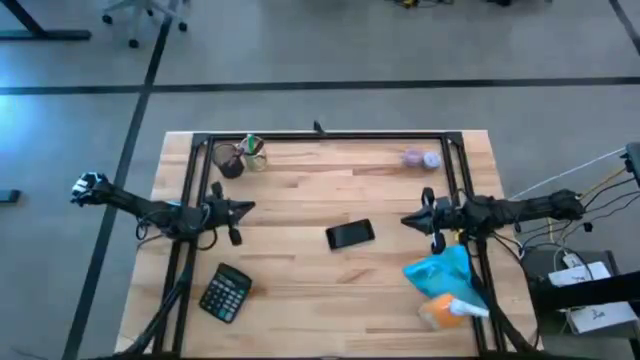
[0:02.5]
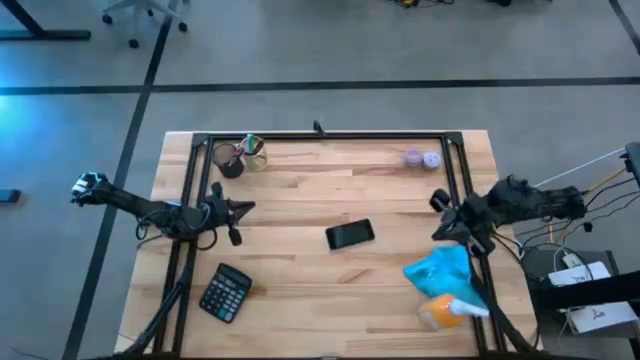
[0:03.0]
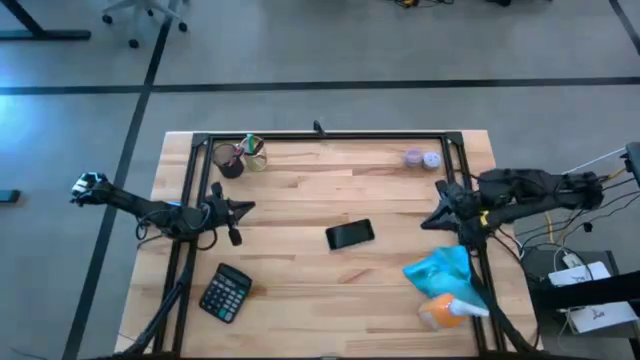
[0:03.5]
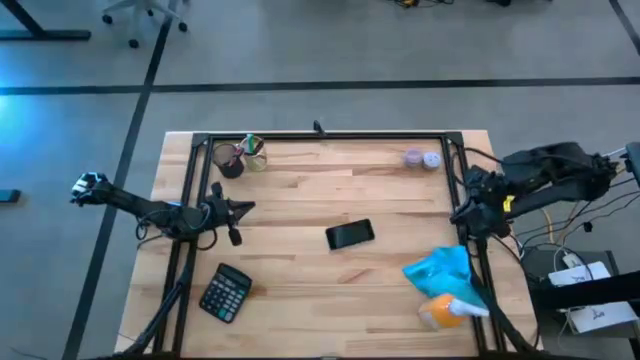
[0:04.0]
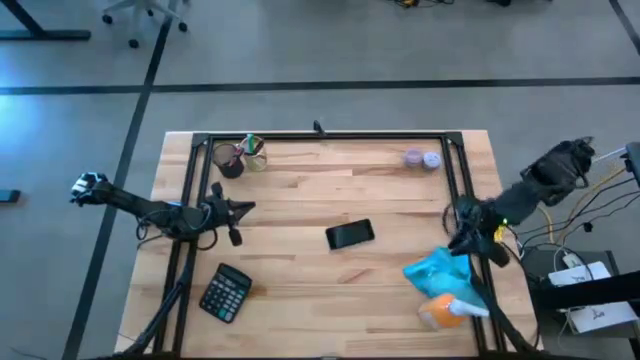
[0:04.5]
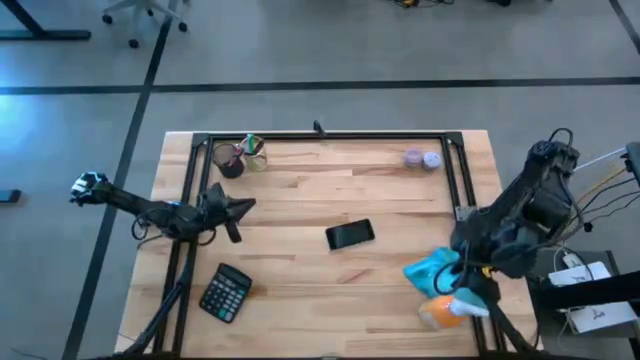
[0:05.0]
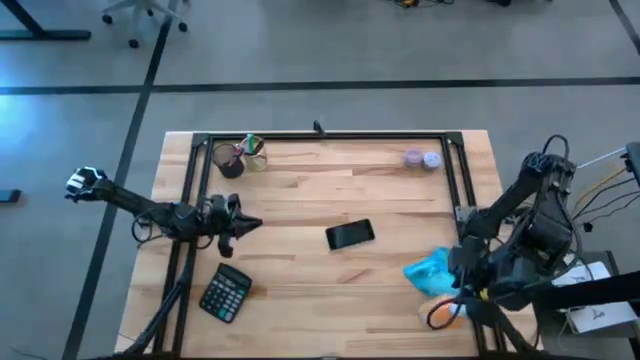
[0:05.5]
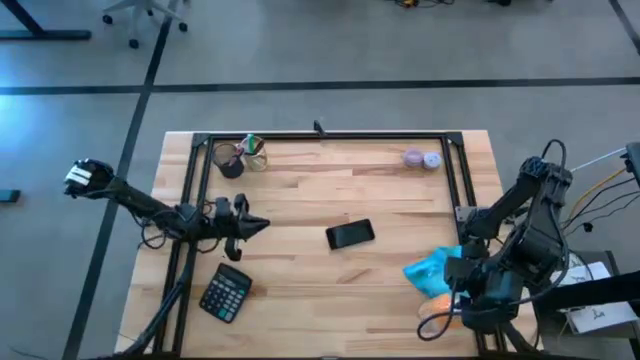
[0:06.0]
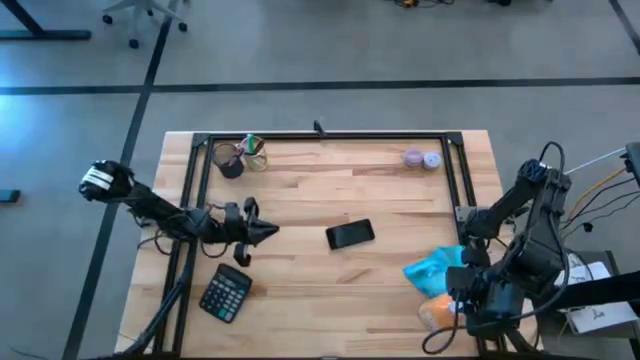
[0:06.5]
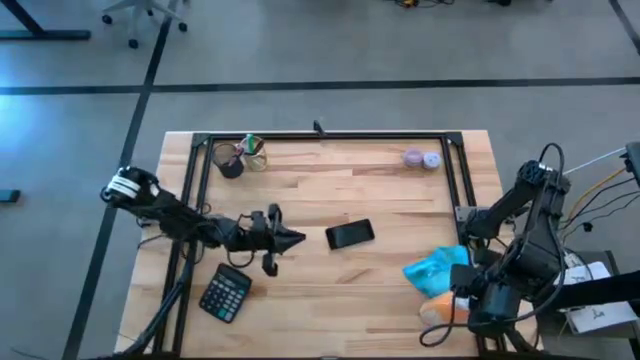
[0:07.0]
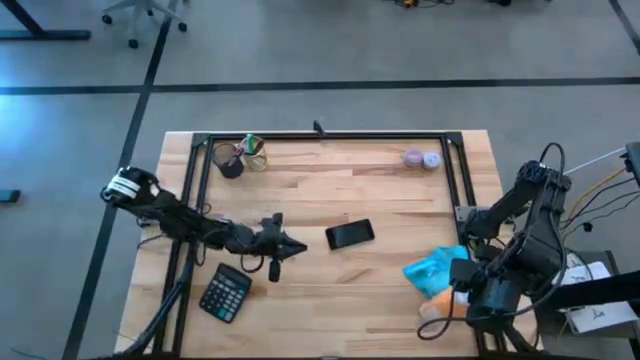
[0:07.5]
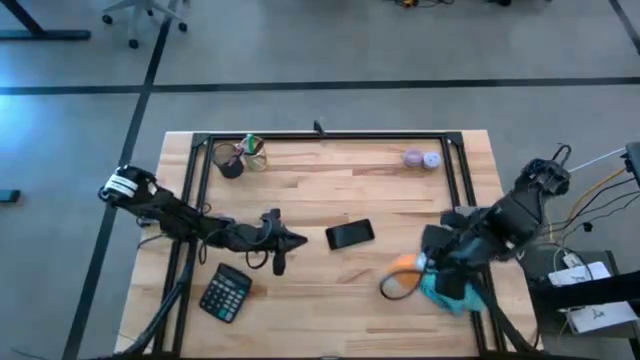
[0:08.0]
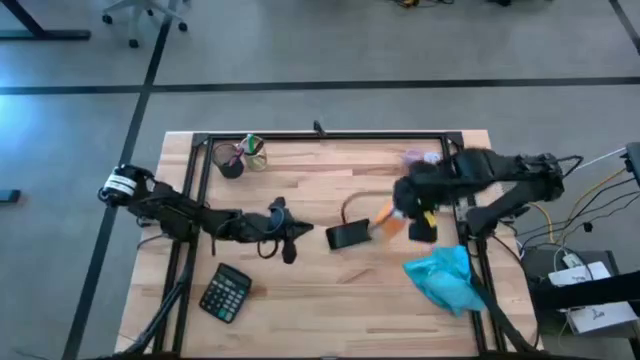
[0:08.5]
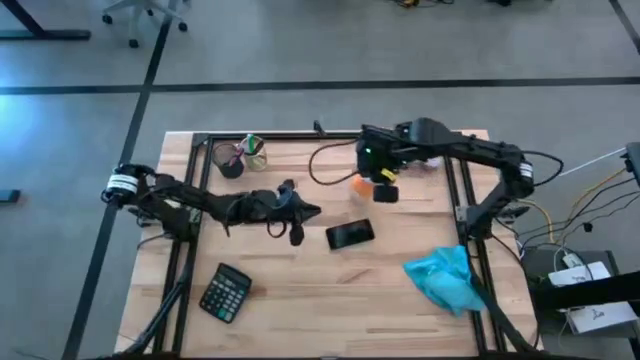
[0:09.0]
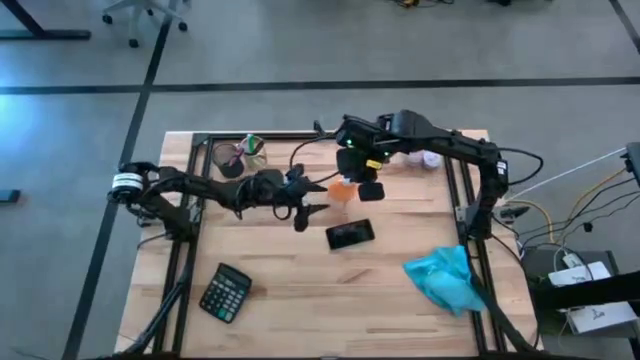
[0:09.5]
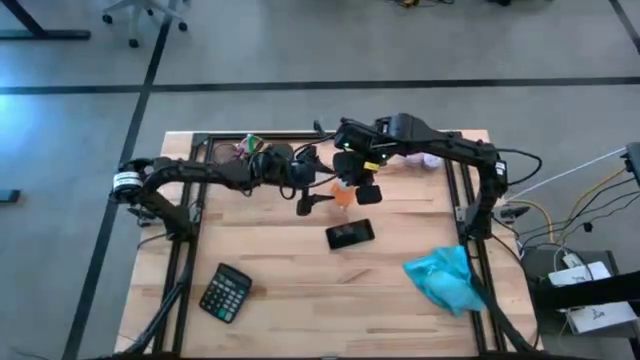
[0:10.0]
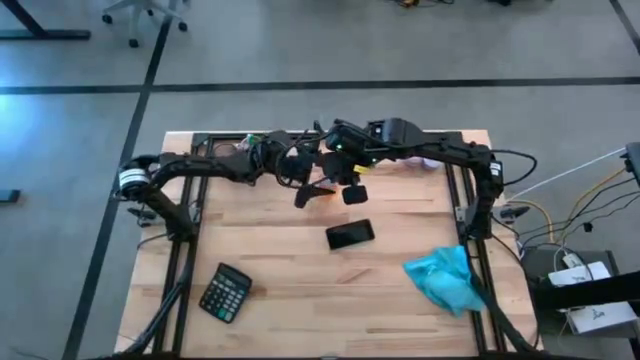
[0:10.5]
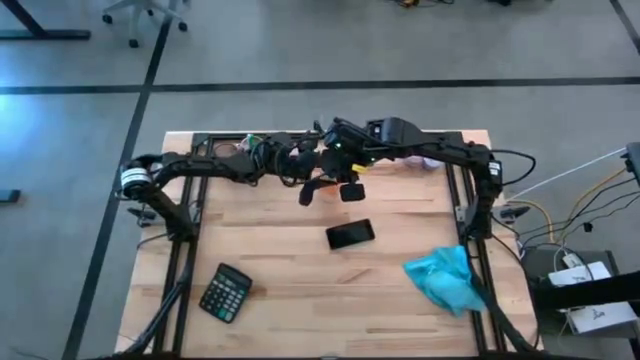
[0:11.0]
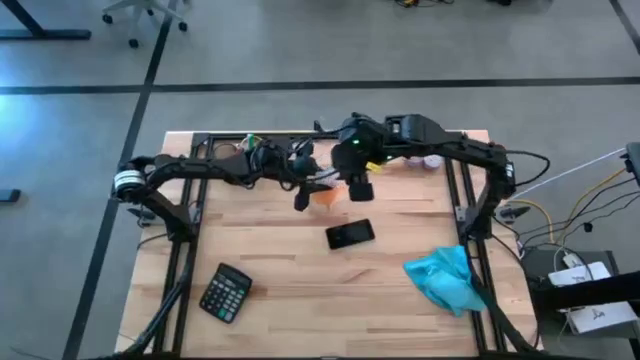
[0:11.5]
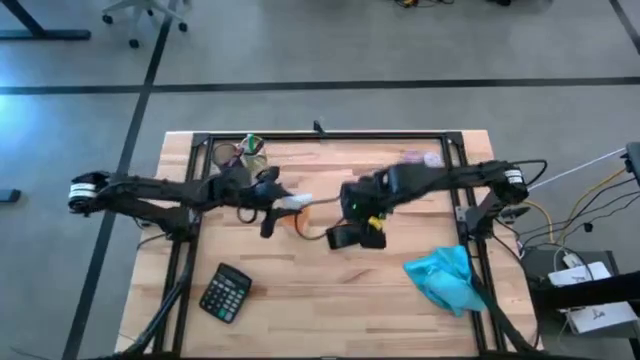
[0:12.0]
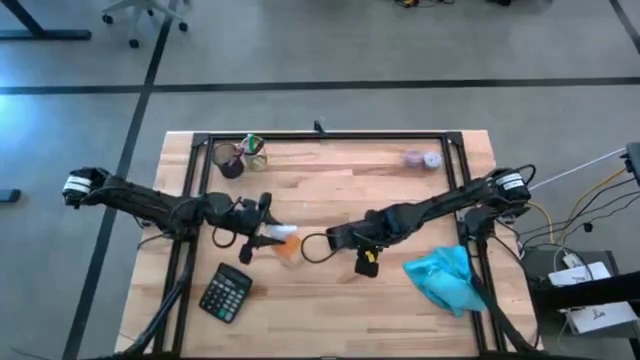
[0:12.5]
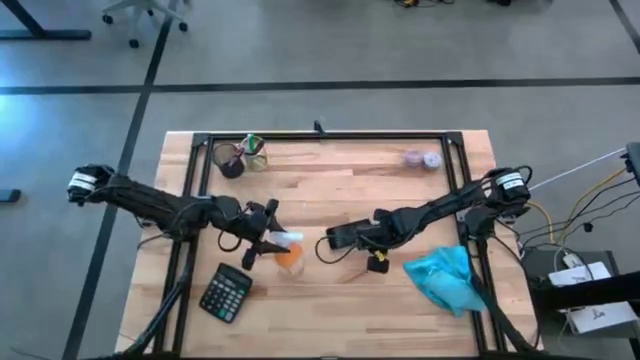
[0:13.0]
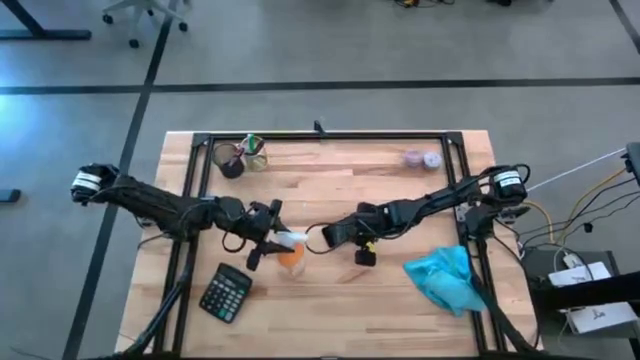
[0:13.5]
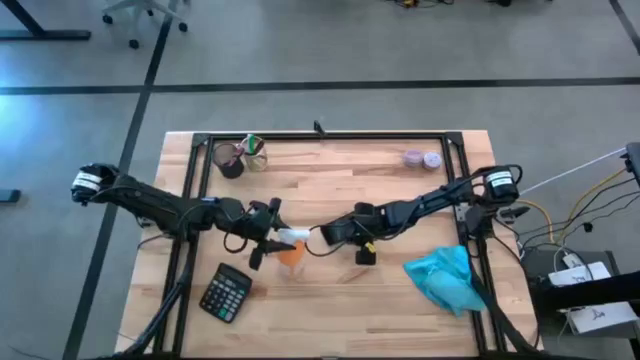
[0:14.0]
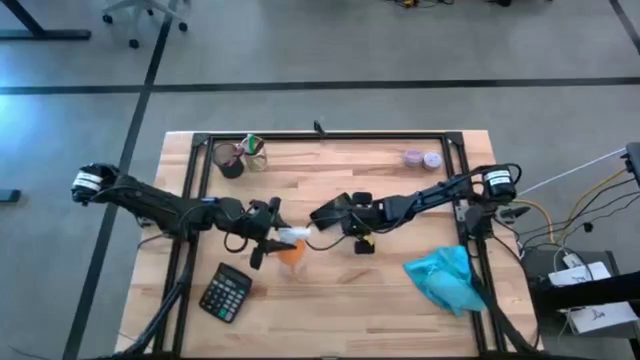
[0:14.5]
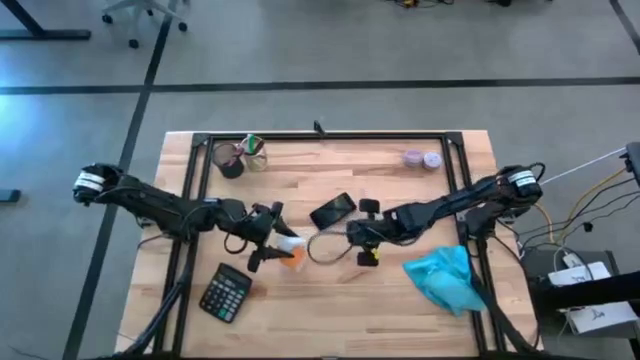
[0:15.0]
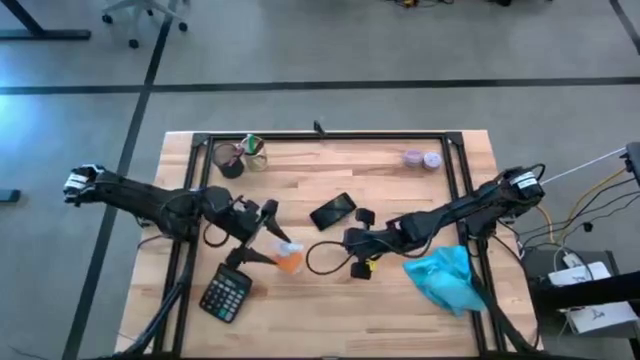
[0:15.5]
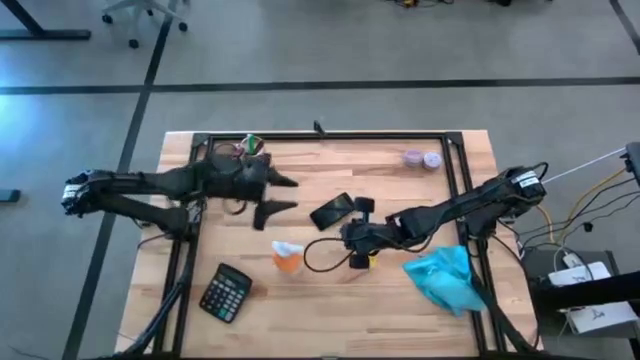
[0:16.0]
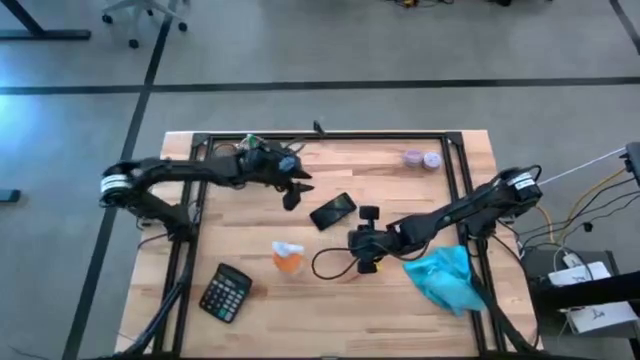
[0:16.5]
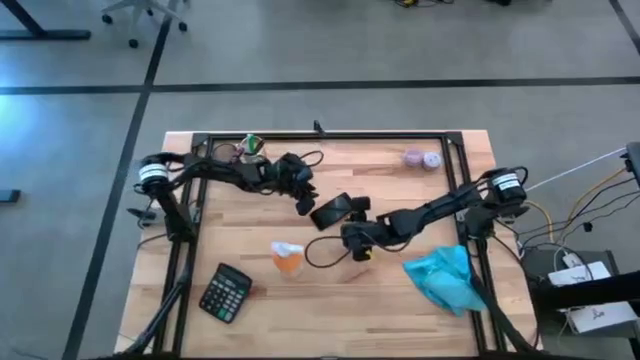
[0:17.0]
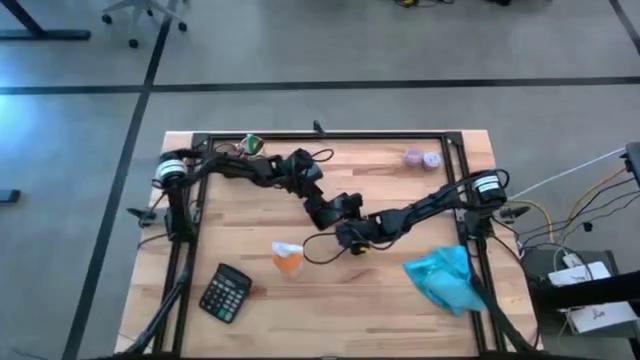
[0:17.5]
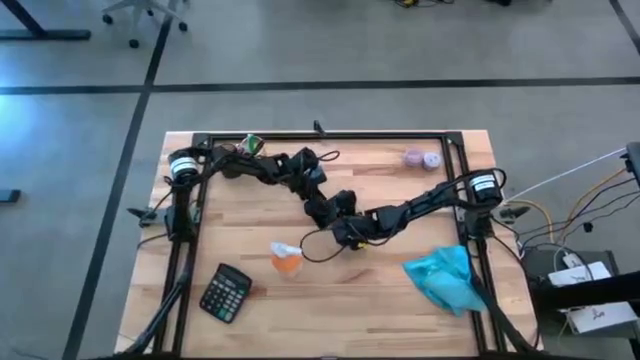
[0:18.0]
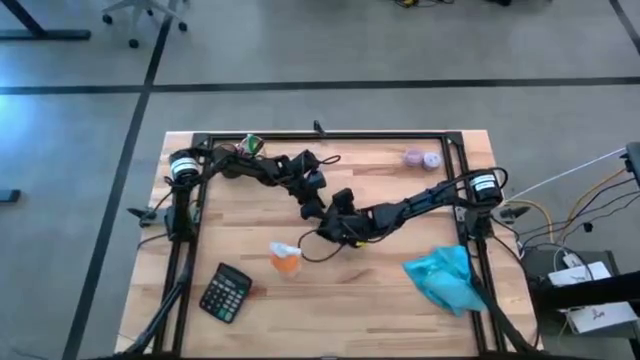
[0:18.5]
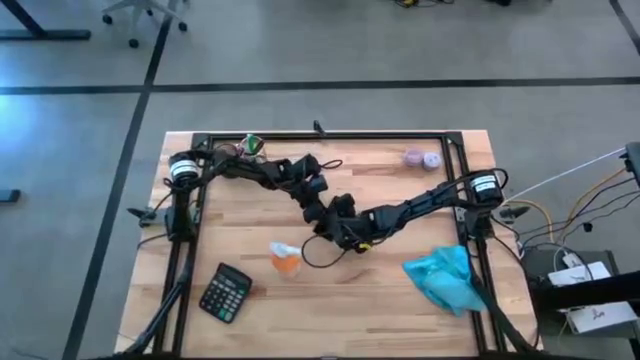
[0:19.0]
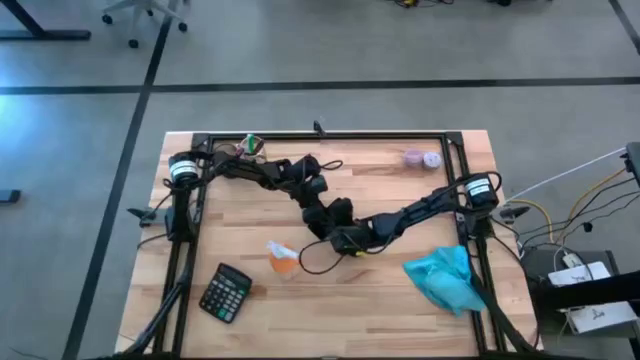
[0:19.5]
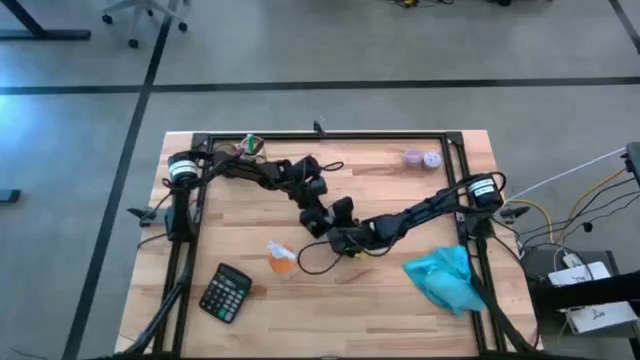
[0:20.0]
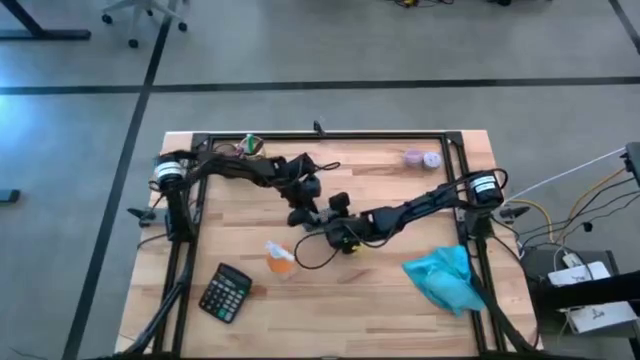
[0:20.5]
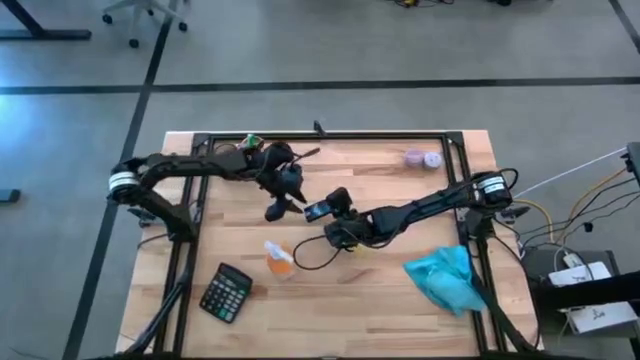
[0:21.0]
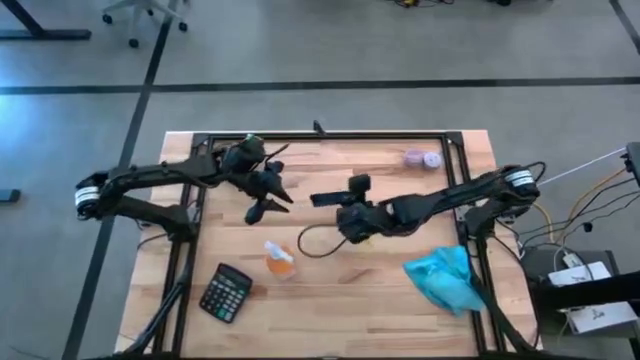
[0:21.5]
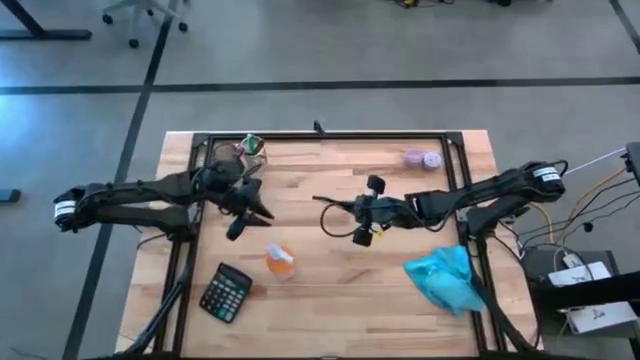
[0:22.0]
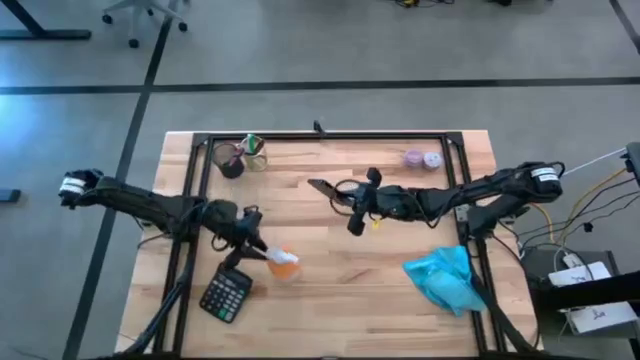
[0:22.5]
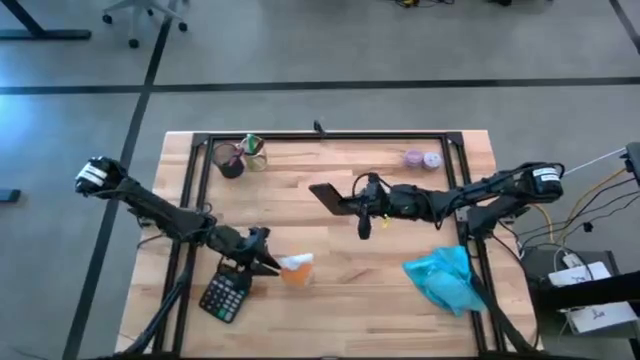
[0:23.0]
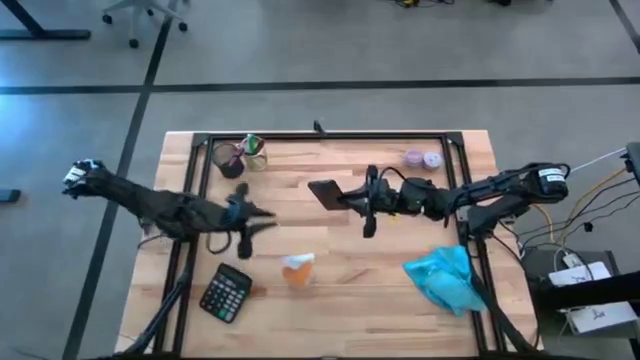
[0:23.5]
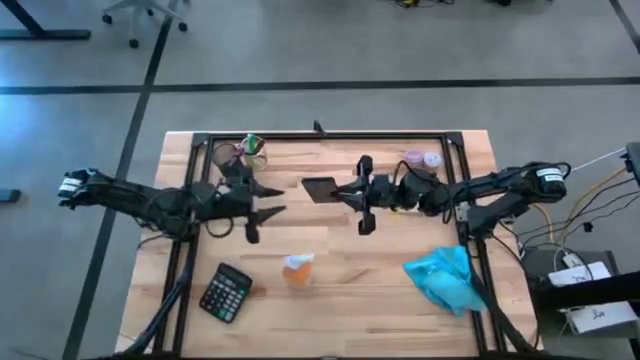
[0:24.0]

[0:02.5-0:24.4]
Task: Apply microfiber cloth
Spray the cellphone with the orange spray bottle
